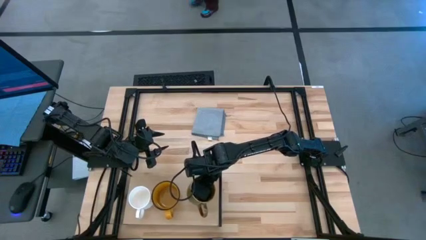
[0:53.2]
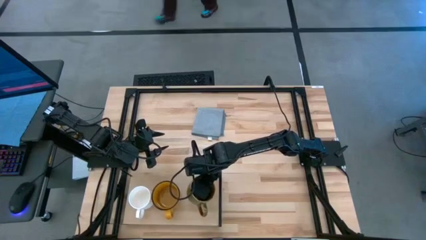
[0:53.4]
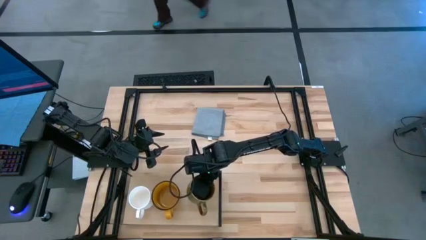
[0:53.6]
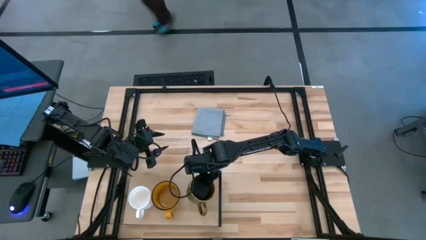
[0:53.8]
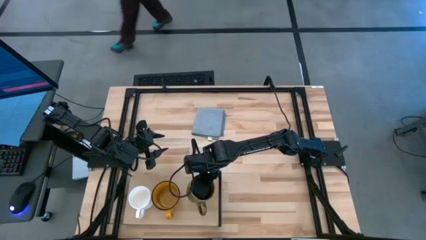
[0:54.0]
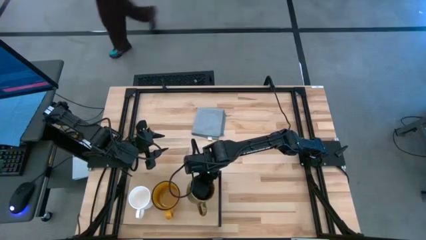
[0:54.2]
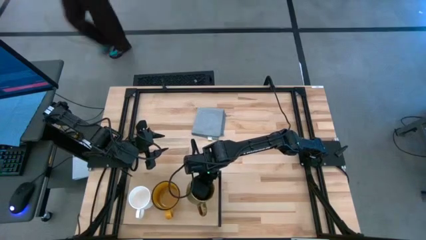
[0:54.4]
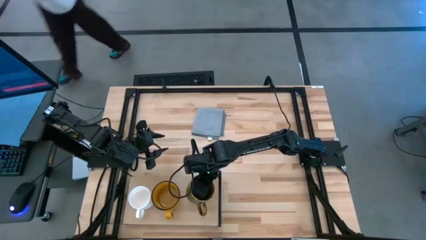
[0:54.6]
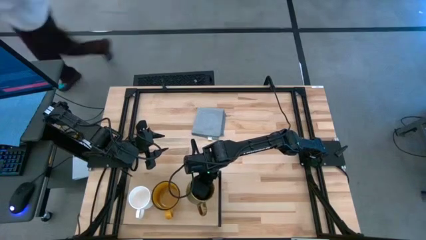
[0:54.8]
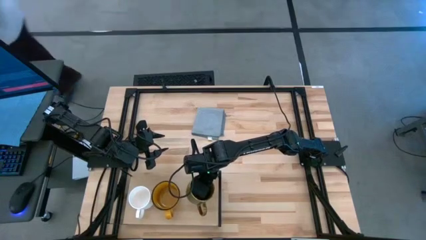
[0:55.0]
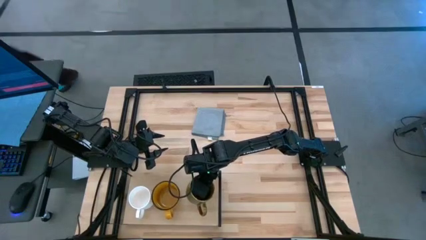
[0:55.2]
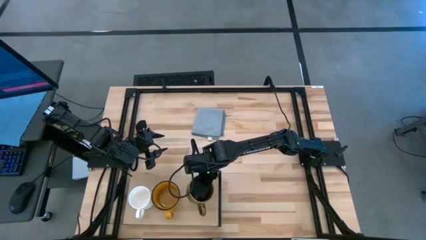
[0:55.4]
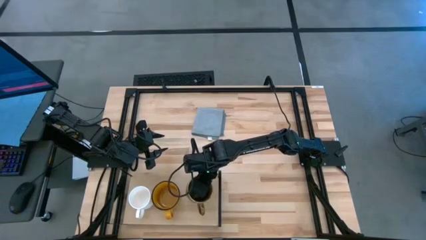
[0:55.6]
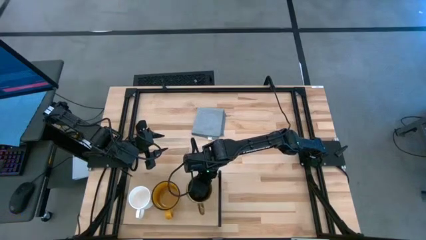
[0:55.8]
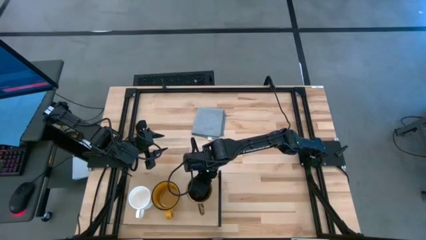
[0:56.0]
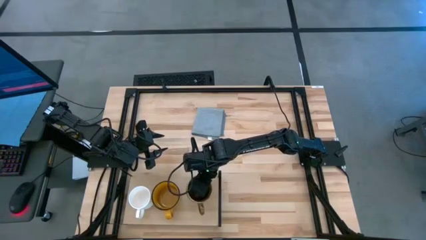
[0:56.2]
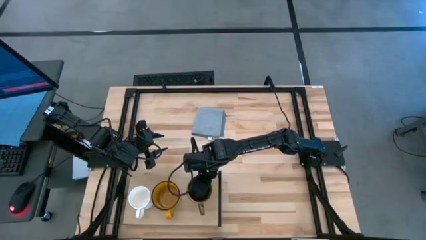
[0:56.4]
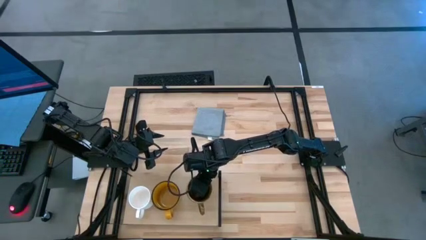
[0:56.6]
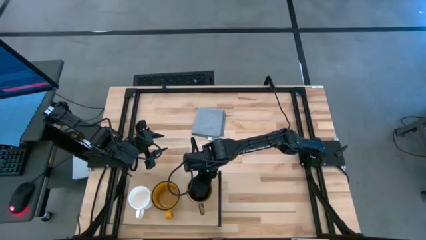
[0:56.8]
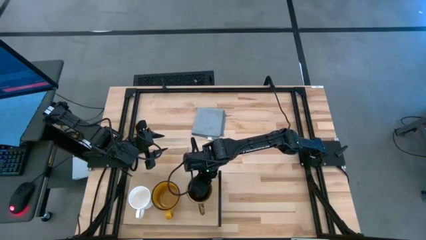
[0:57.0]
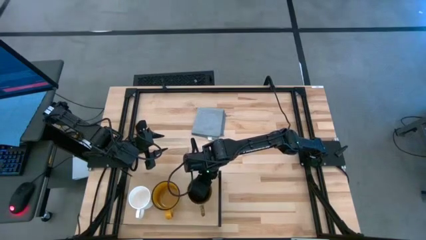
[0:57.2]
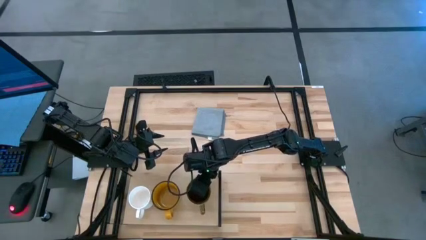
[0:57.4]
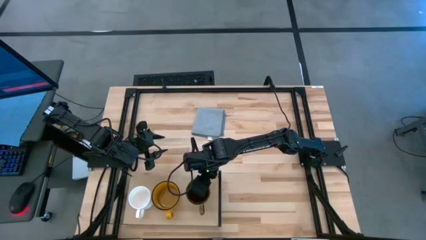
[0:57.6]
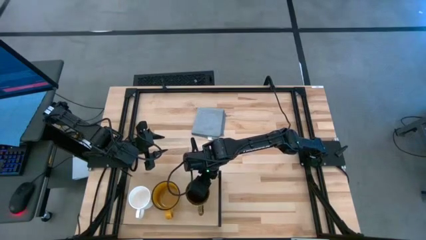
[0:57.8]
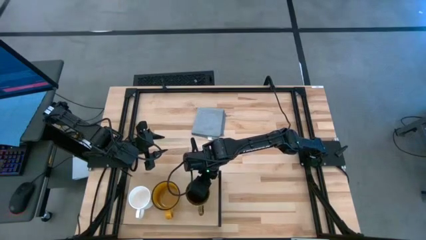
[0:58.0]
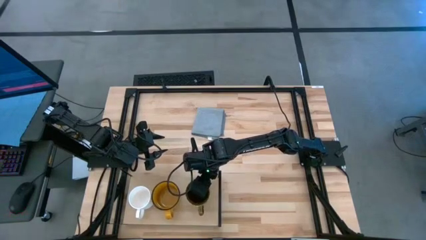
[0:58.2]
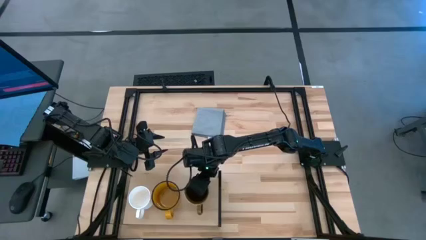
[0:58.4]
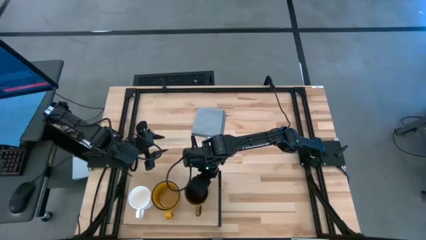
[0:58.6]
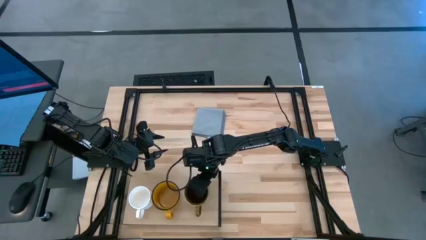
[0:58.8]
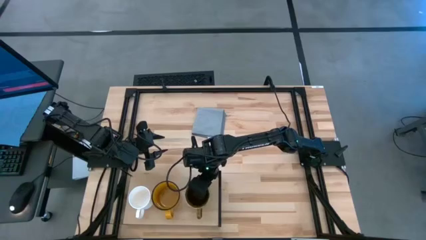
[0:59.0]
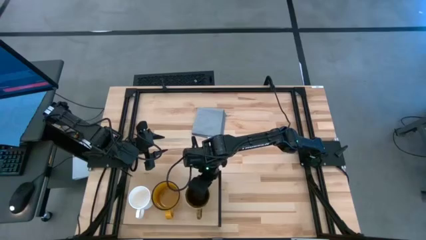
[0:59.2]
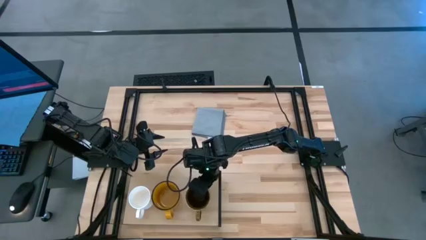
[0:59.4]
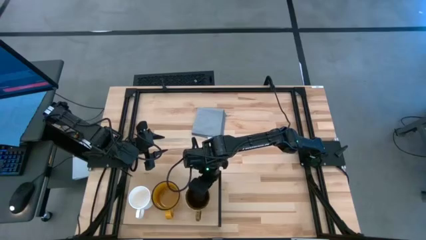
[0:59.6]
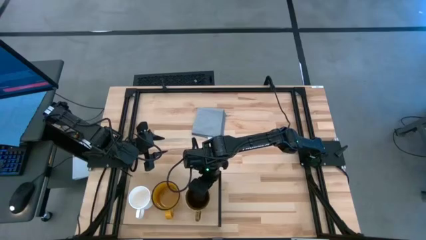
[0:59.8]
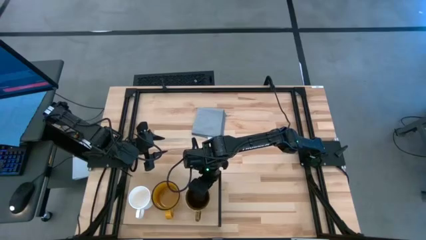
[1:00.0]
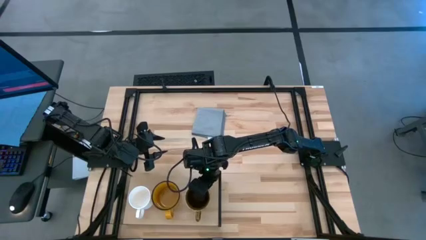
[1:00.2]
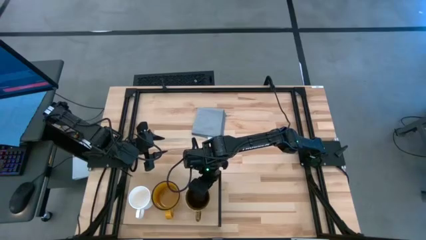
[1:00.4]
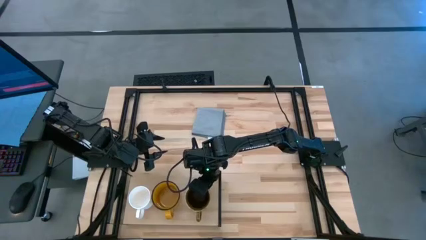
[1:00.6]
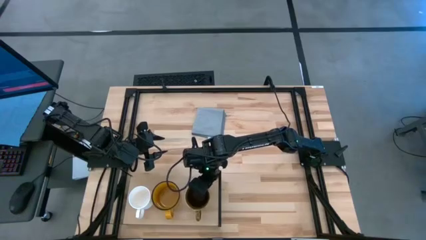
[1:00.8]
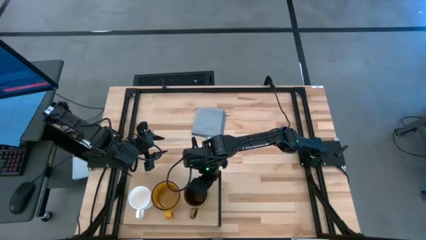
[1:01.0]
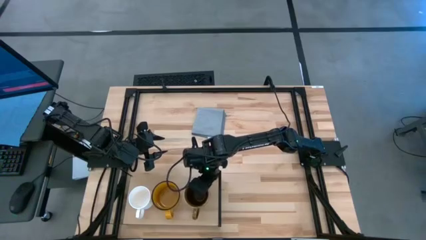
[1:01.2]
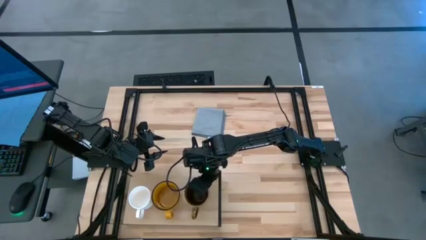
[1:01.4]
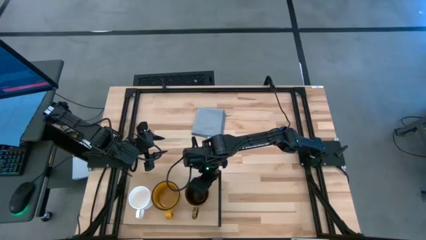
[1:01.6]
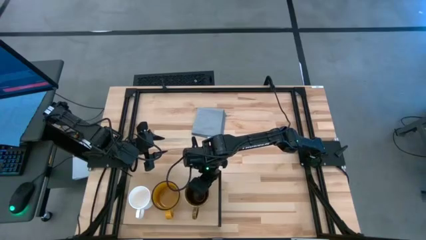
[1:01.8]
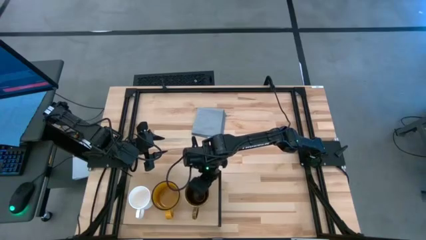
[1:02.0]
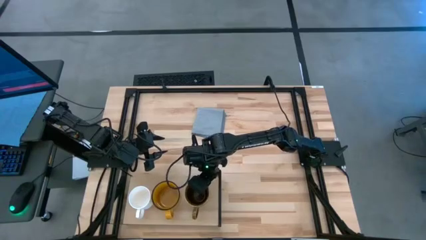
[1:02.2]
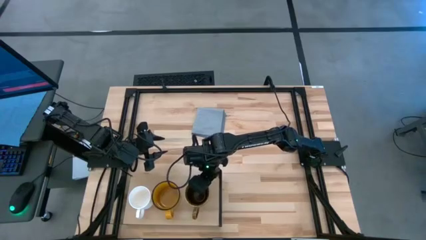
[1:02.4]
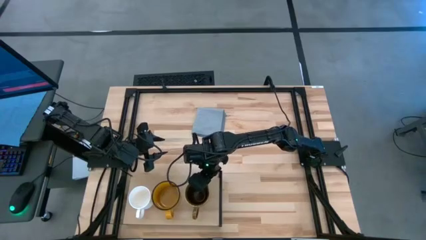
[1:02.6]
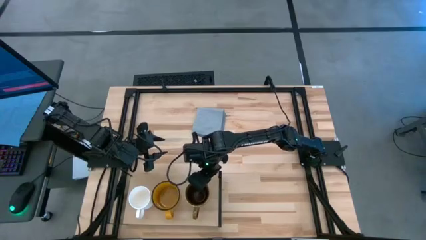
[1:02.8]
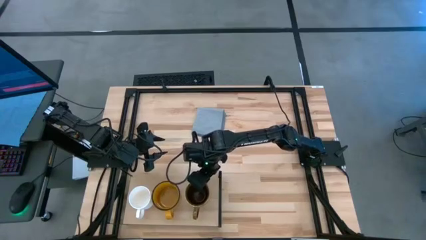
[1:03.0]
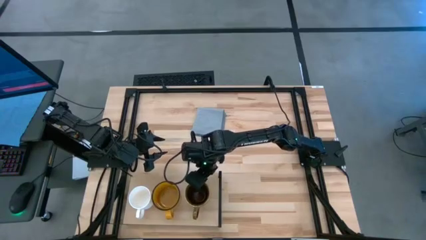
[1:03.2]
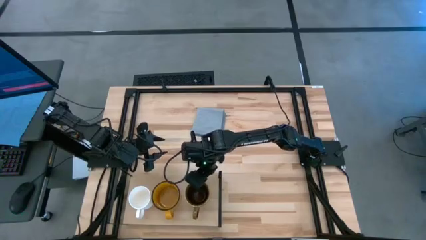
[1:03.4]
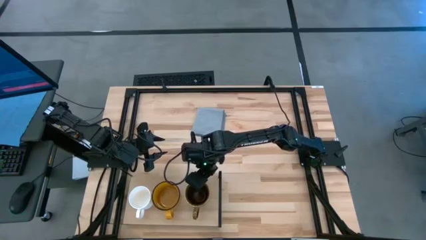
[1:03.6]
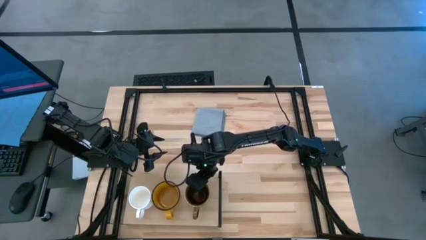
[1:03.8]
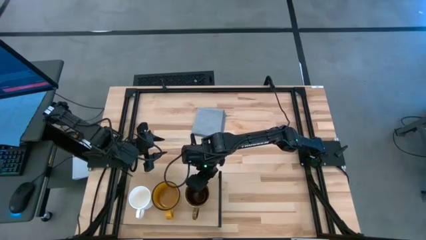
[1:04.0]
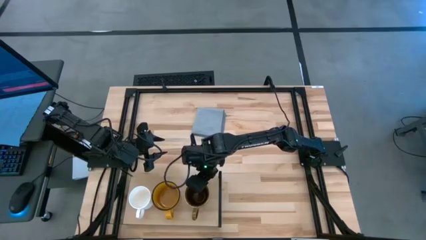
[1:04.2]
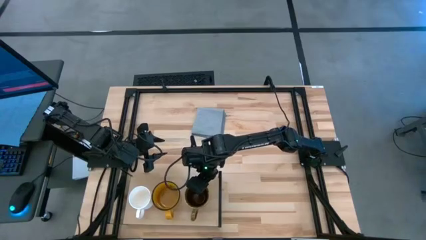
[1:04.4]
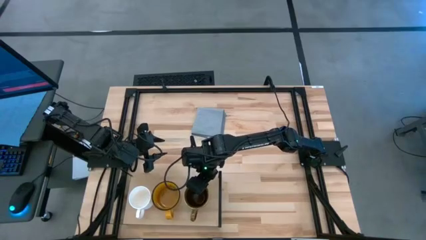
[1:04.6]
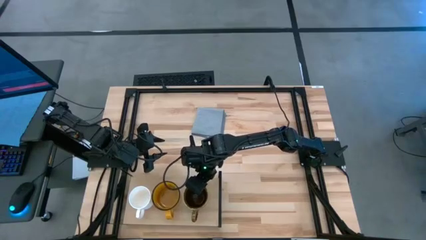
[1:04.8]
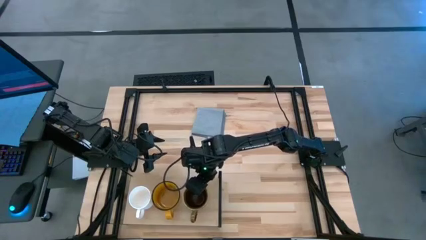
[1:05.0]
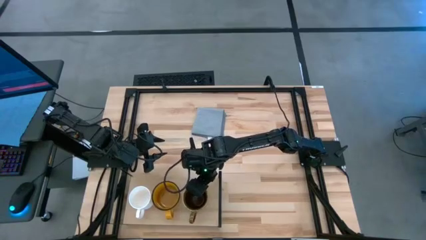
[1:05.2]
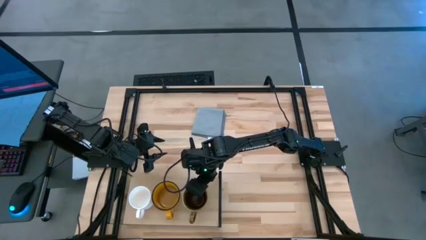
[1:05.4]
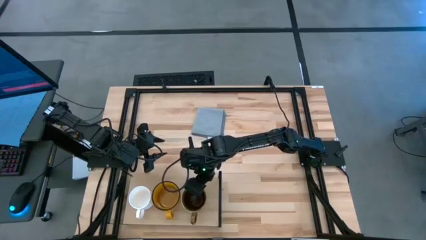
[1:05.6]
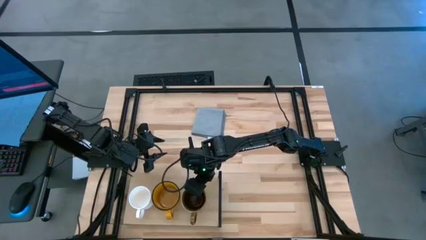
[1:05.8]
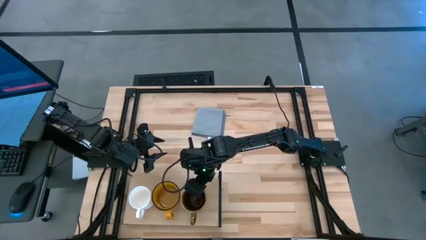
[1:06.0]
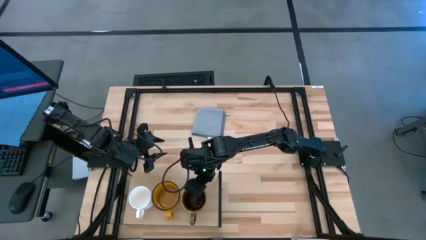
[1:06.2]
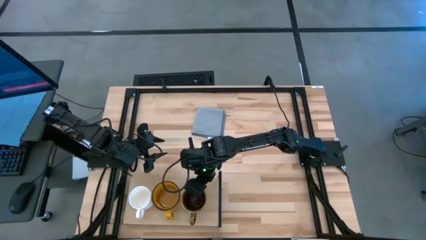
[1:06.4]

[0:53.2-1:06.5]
Task: Stack small to large cups/mugs on shelf
Put the green patterned mug on the shelf

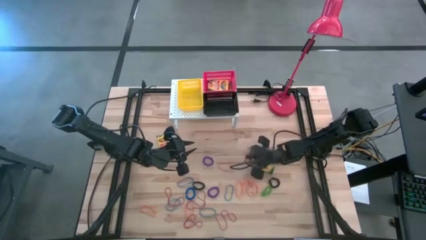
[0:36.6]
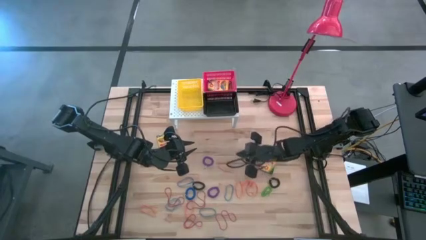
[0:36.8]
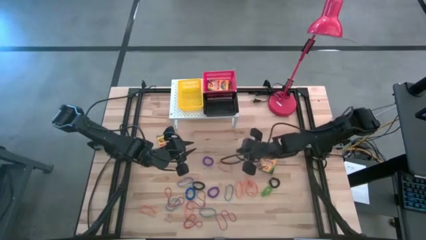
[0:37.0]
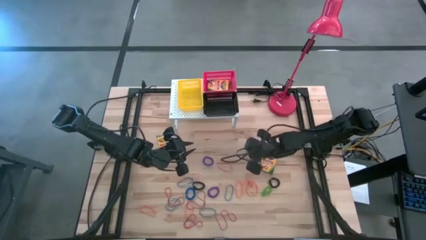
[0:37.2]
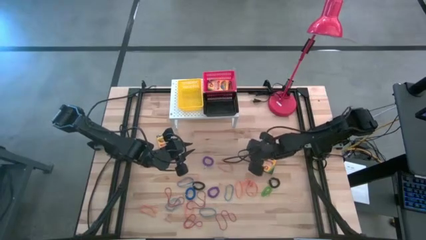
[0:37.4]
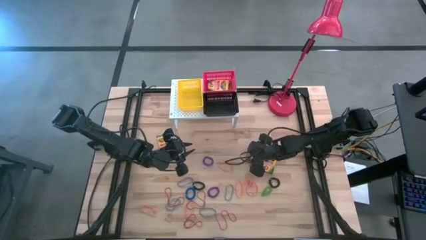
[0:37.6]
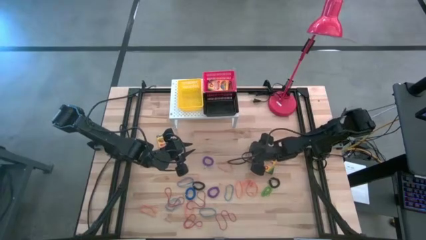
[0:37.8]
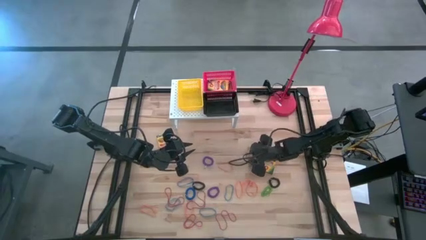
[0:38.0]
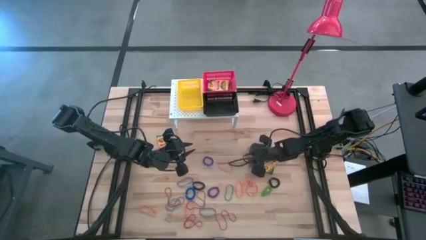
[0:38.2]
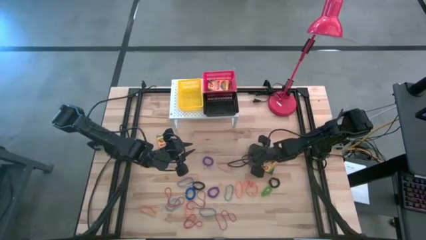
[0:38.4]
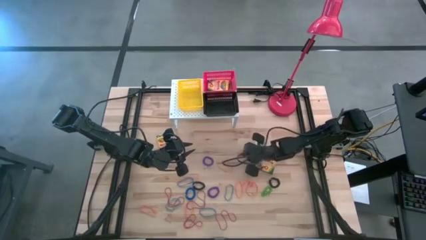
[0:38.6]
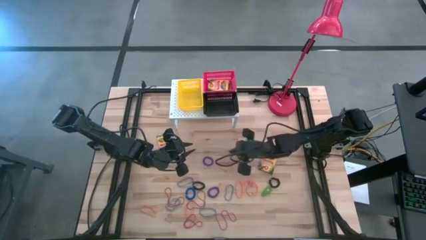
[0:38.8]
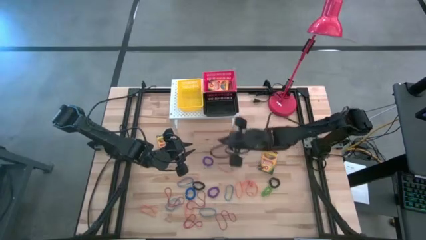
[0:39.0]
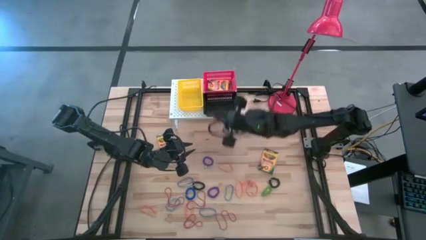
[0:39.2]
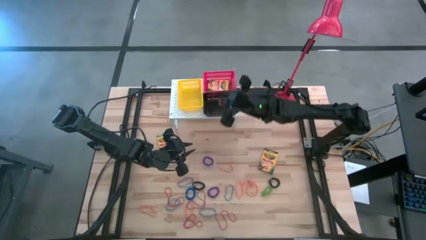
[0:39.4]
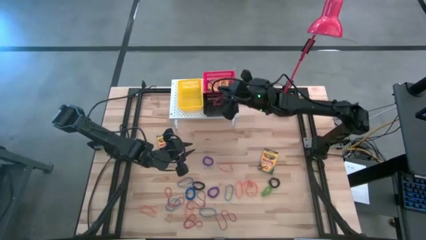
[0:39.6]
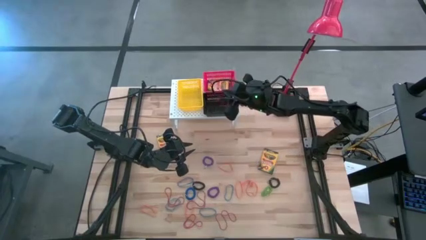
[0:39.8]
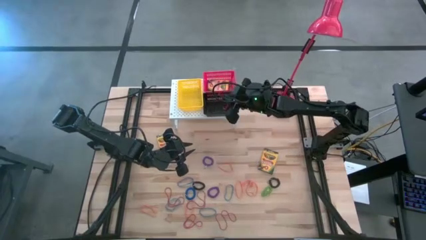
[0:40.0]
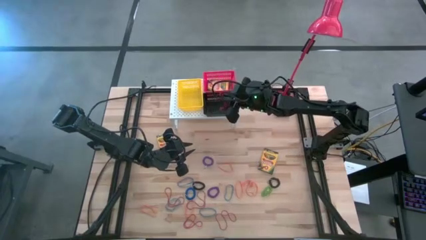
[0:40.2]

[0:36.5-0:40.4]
Task: Pick & Place Office Desk Supplies
Put the red rubber band into the black bin on the shelf

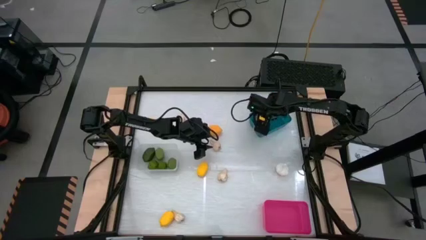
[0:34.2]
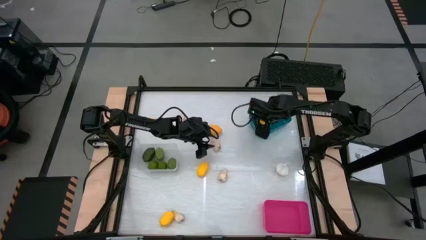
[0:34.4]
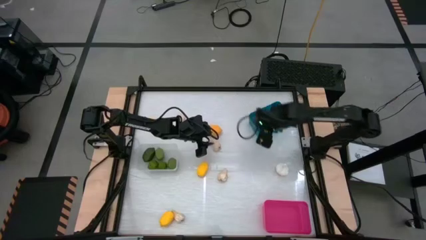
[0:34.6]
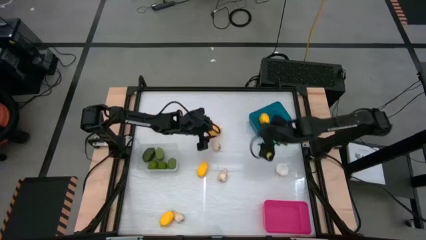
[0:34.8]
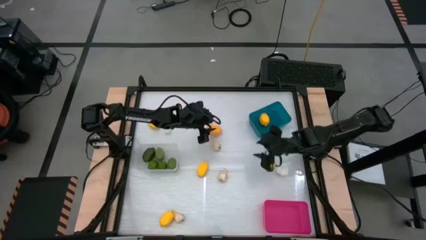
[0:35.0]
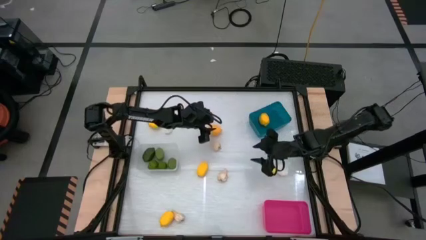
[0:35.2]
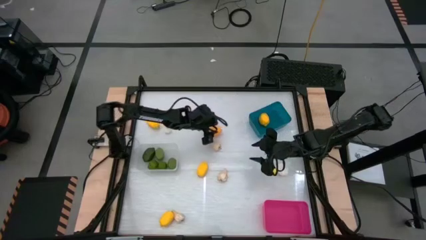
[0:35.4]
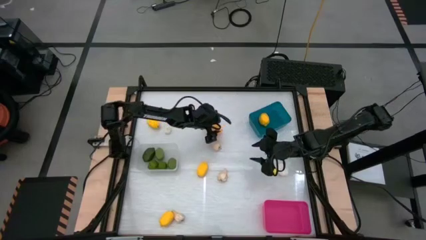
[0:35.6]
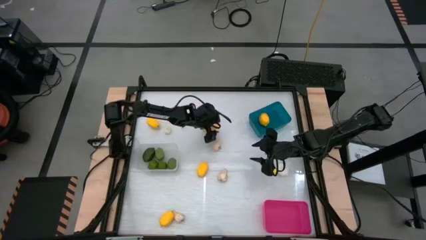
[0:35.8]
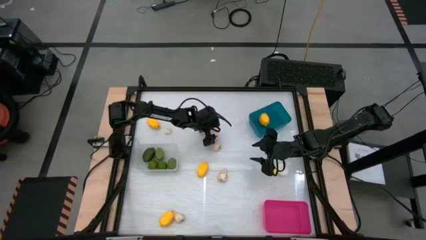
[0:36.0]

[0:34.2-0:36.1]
Task: Sort produce into baskets
Put the yellow lemon into the blue bin
